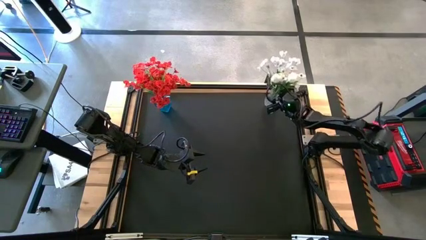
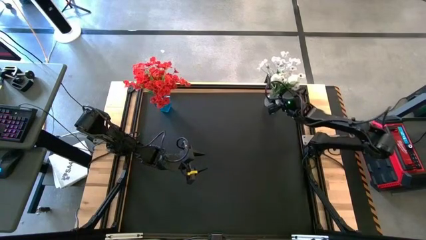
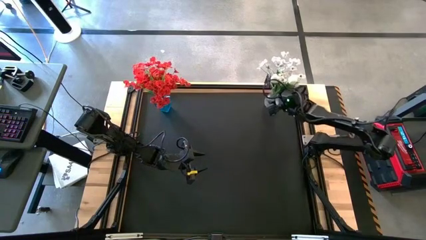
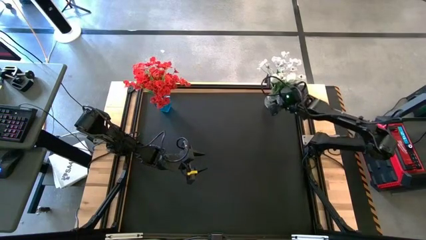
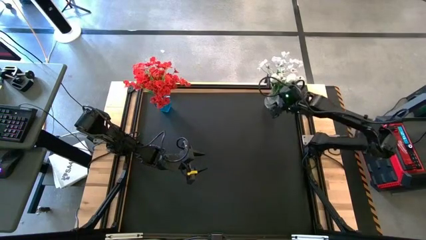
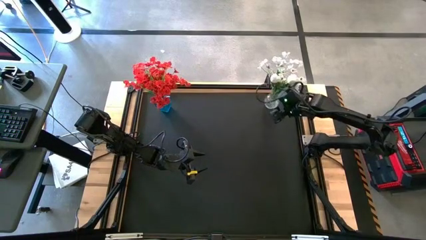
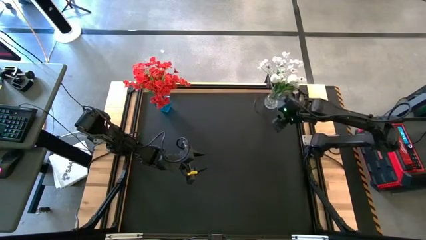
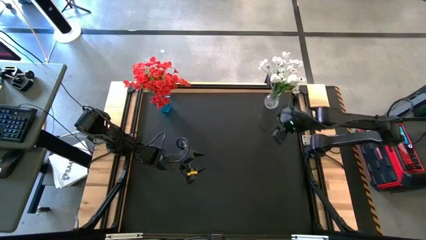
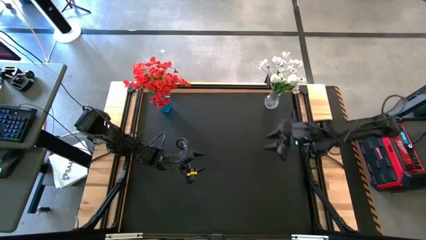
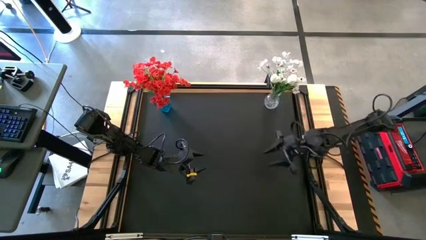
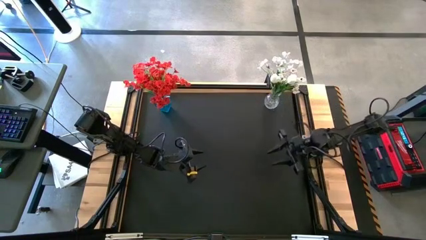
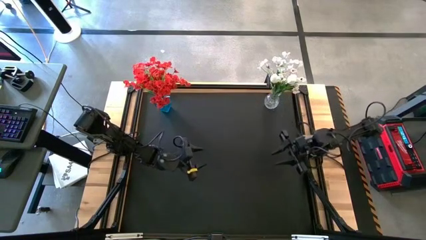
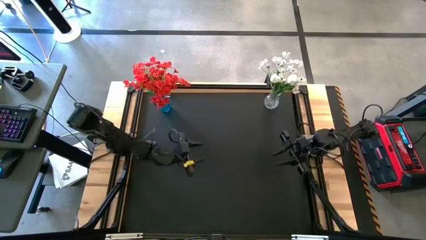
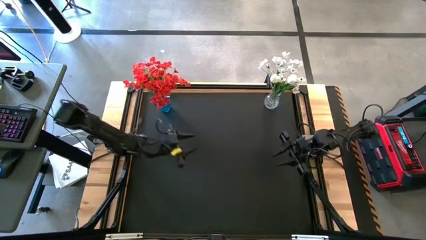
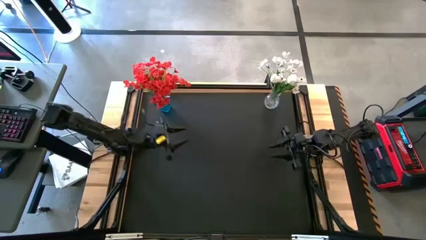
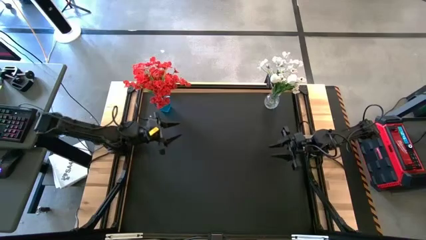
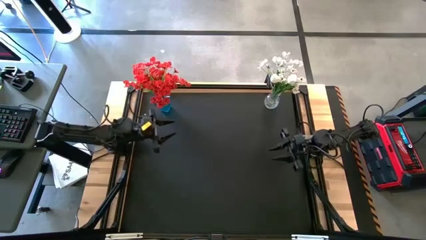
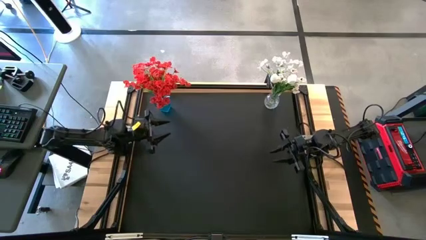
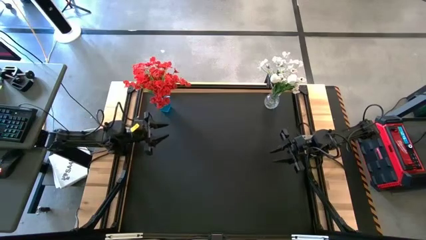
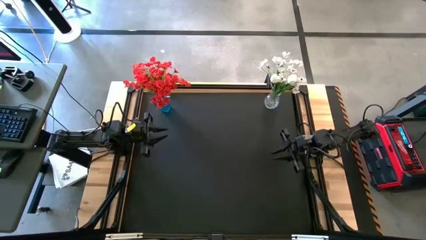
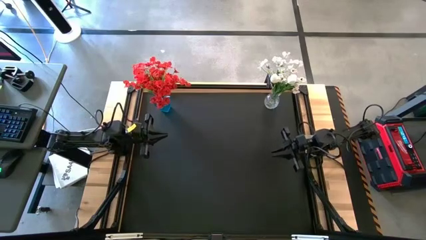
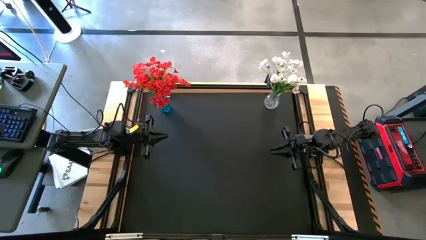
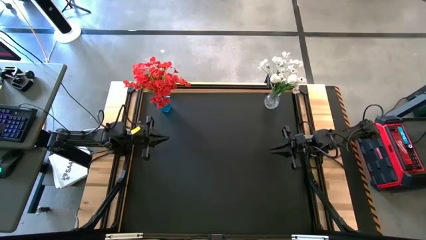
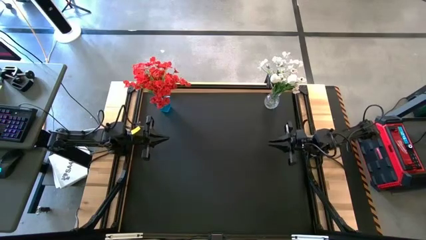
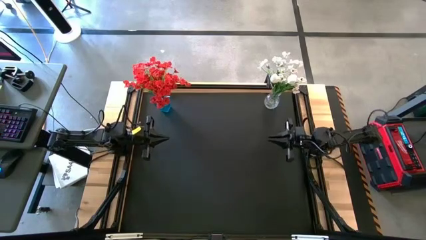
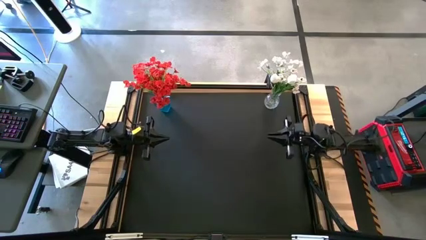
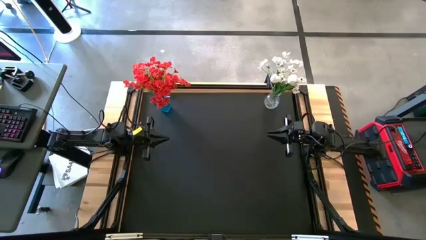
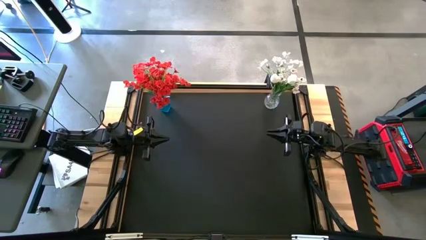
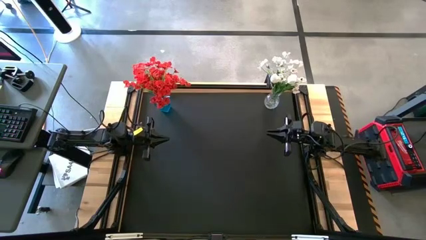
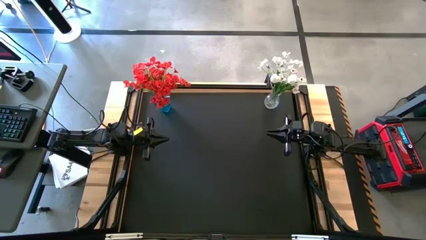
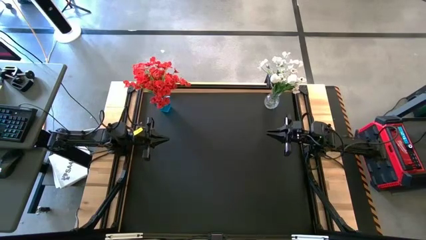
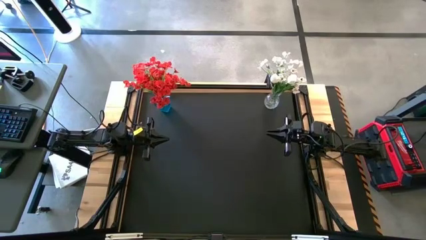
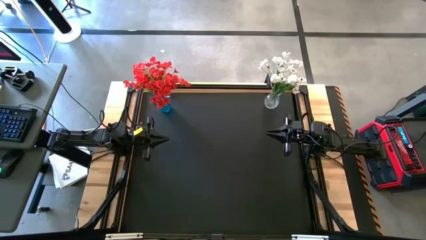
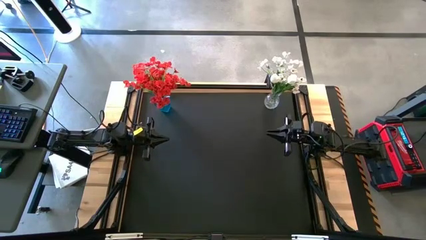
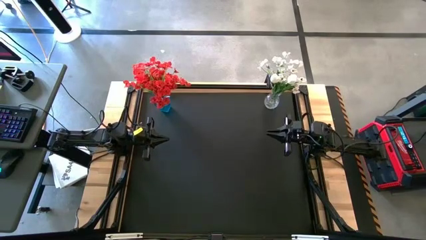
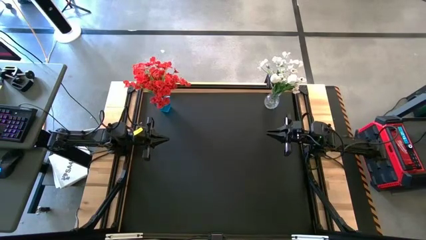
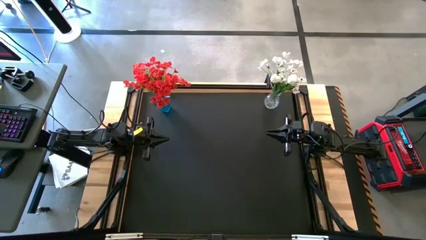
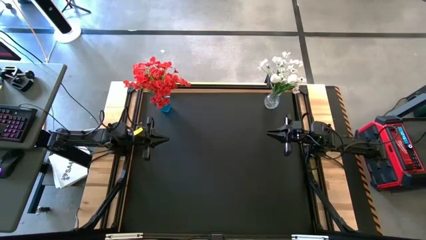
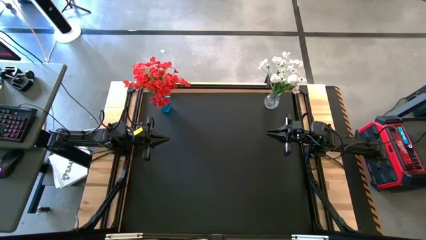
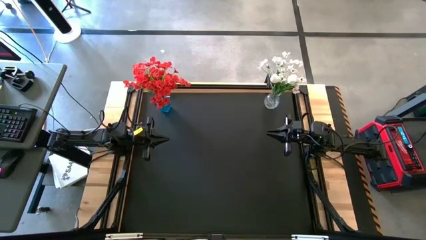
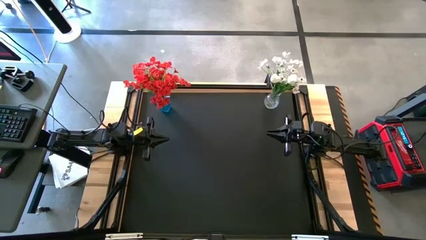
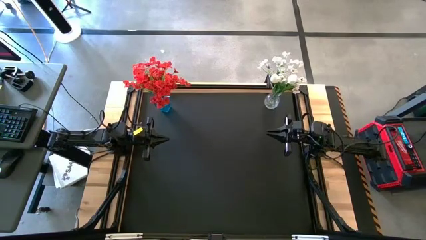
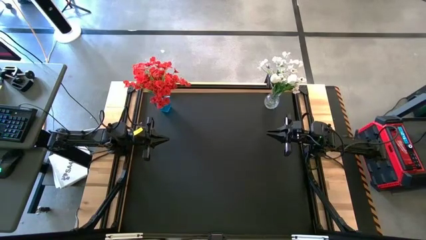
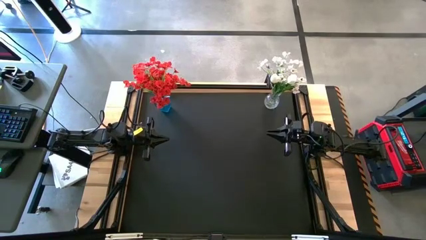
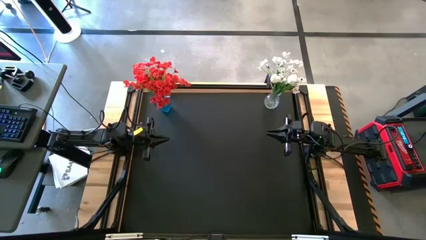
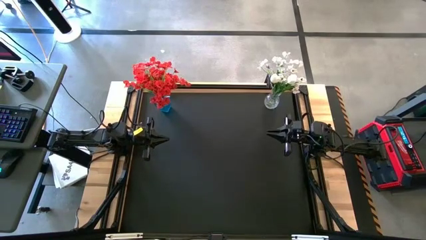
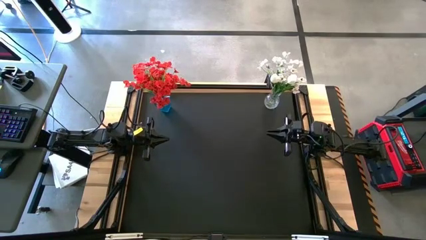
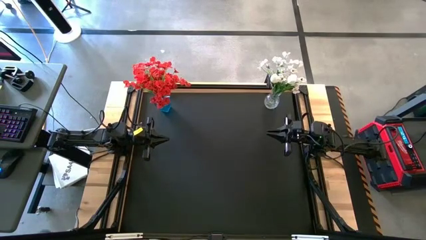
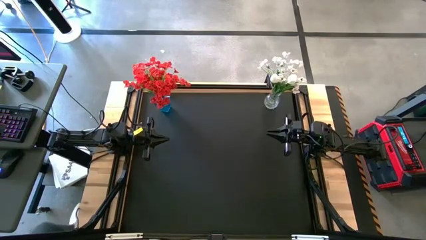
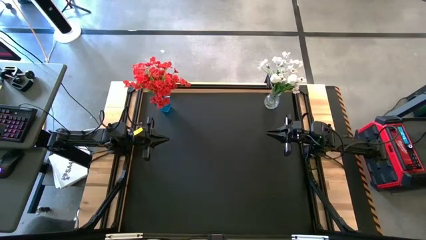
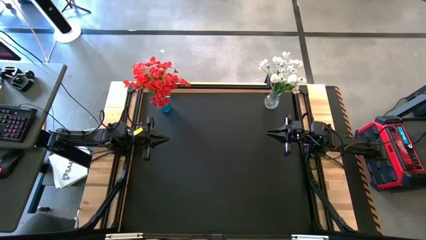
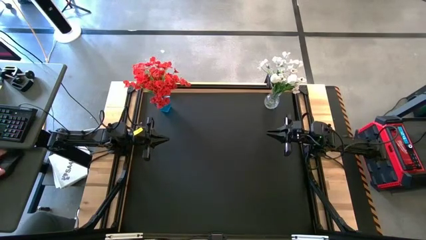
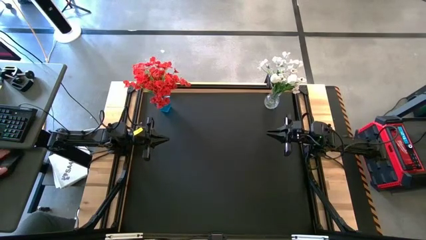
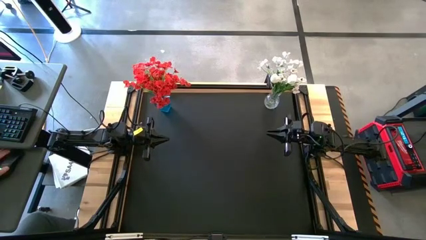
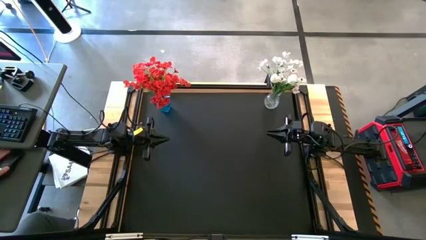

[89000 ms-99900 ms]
Task: Sort flowers into vase by color
Return to Home Position
